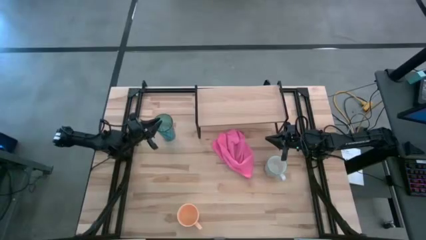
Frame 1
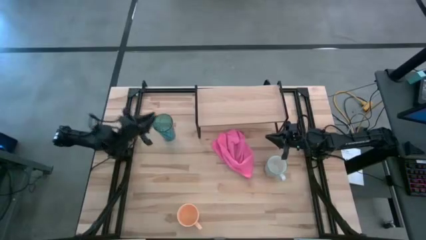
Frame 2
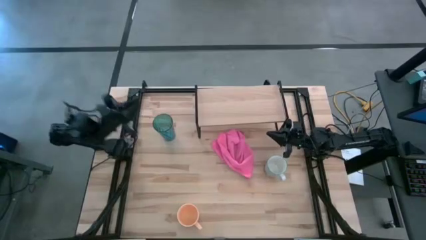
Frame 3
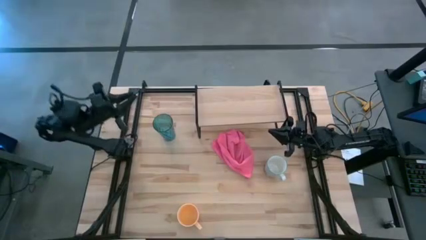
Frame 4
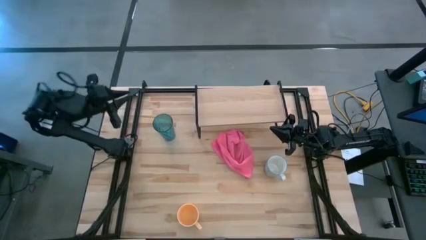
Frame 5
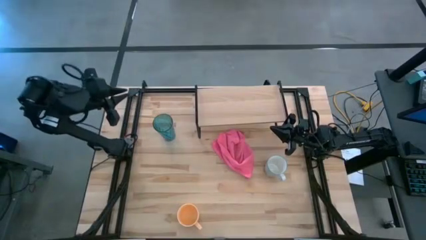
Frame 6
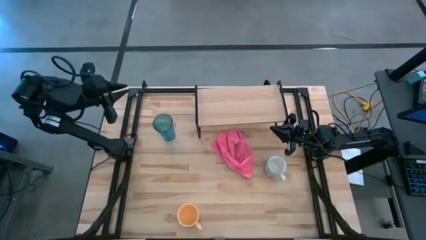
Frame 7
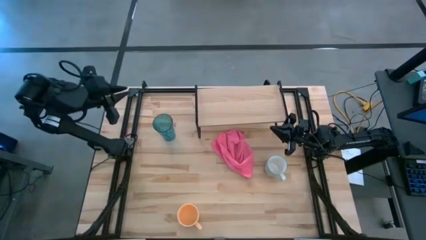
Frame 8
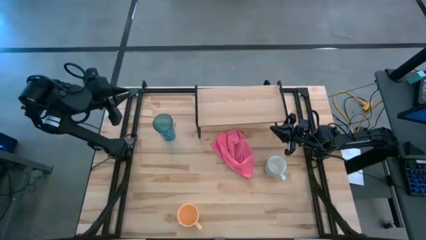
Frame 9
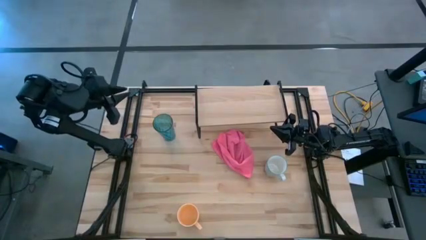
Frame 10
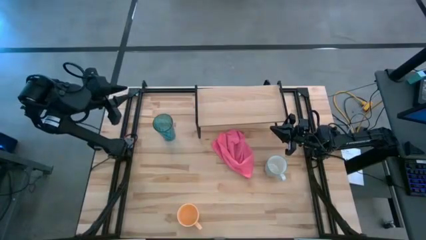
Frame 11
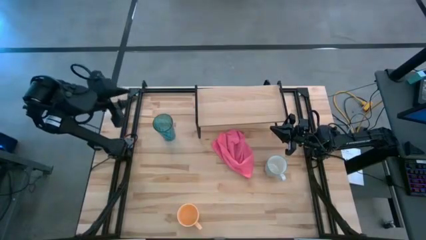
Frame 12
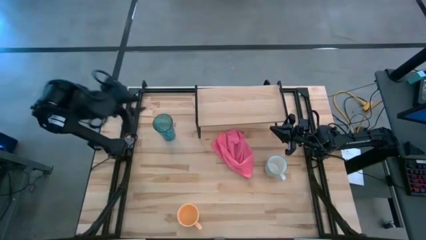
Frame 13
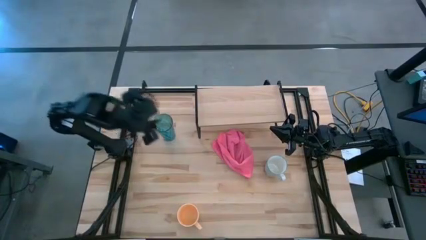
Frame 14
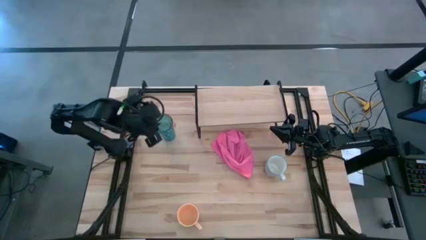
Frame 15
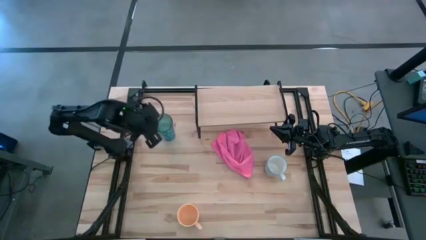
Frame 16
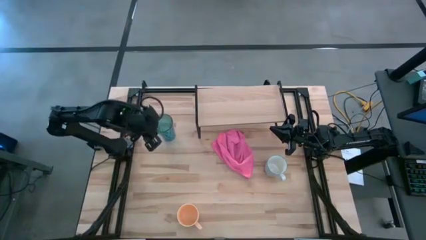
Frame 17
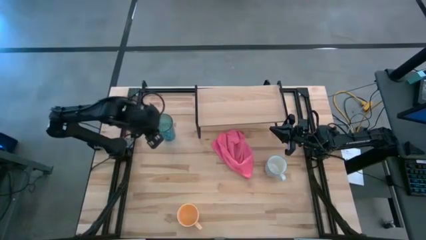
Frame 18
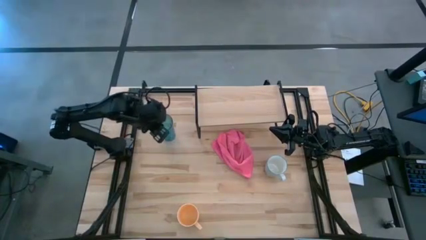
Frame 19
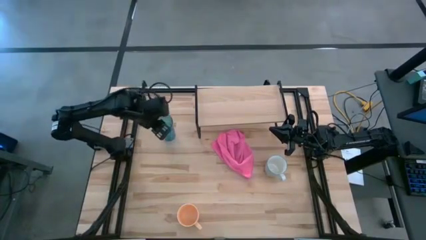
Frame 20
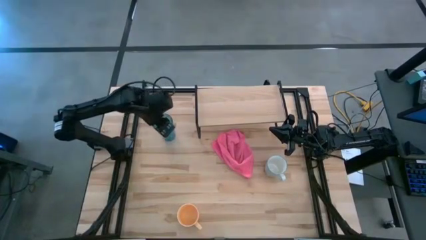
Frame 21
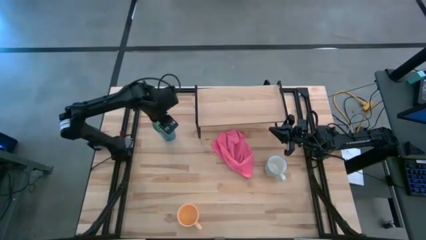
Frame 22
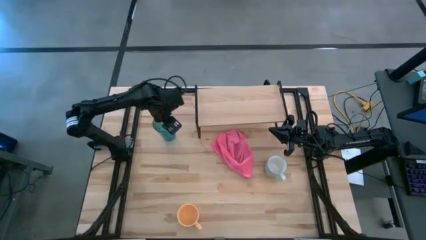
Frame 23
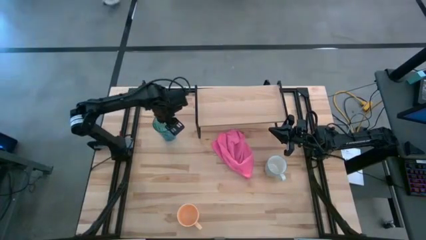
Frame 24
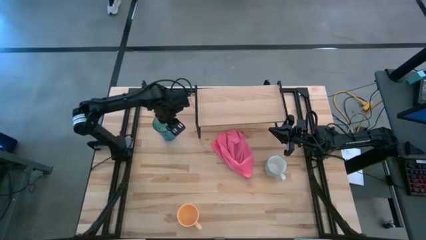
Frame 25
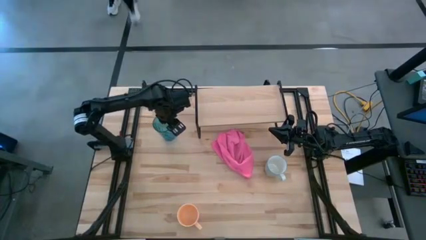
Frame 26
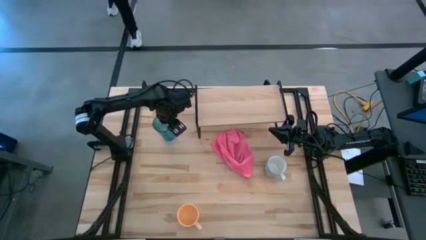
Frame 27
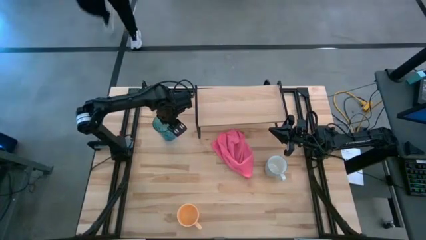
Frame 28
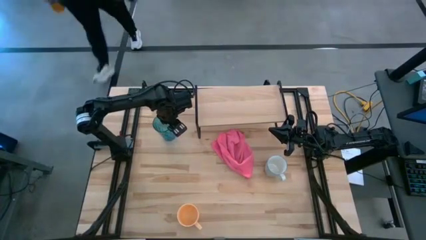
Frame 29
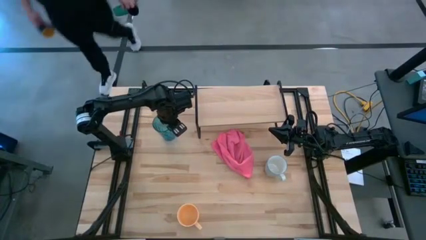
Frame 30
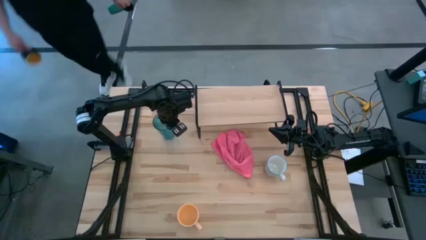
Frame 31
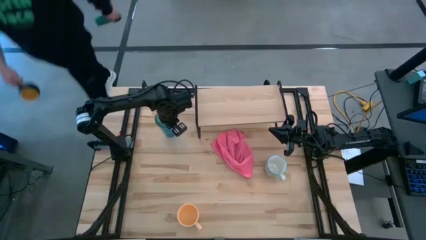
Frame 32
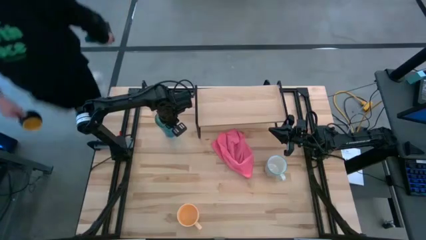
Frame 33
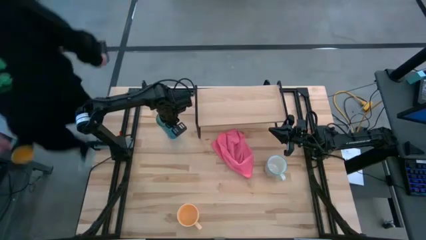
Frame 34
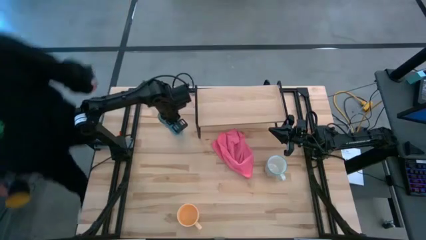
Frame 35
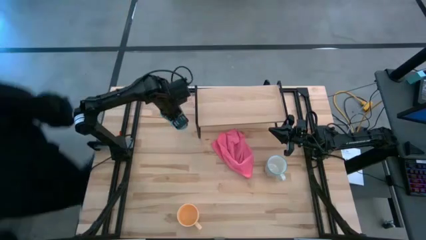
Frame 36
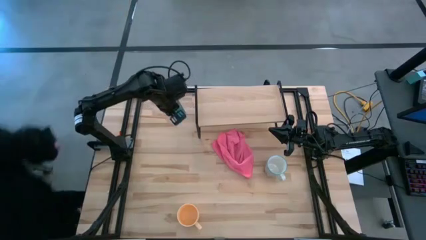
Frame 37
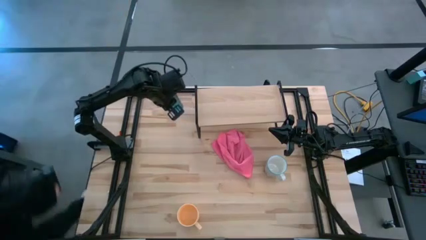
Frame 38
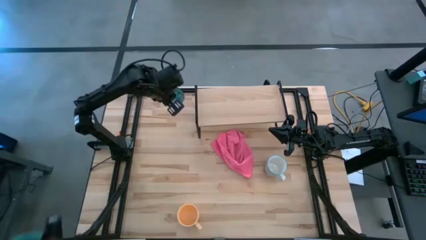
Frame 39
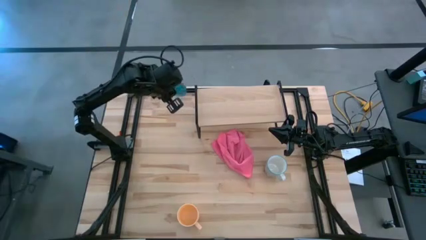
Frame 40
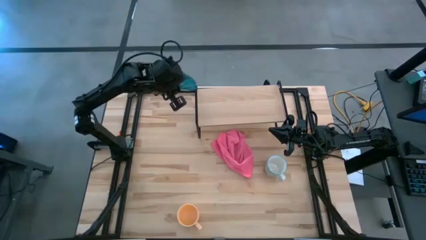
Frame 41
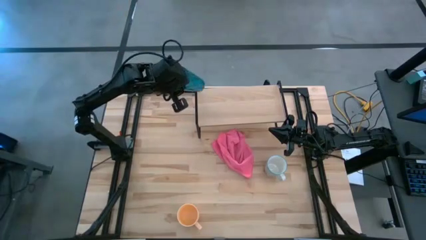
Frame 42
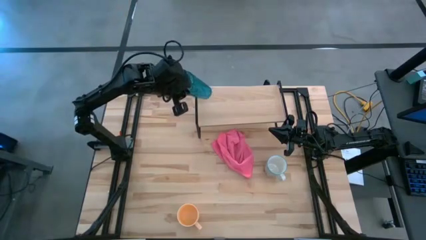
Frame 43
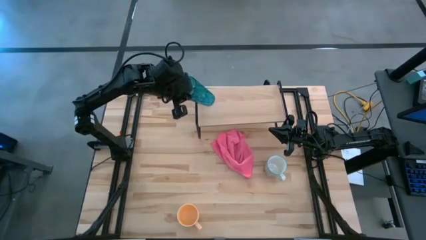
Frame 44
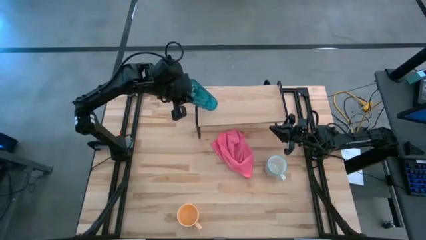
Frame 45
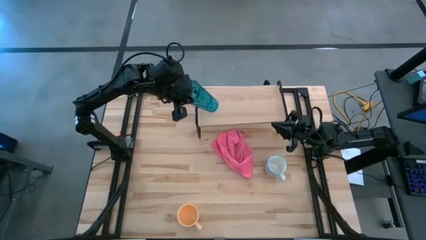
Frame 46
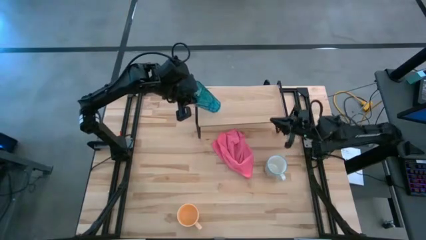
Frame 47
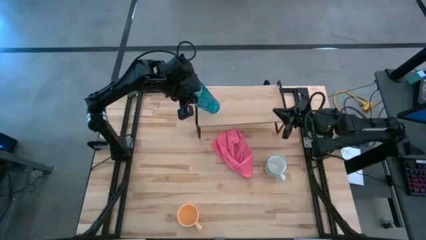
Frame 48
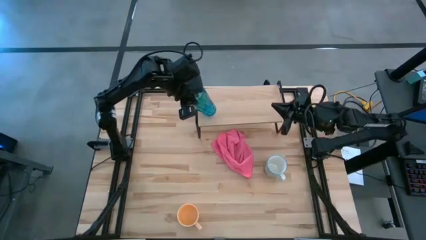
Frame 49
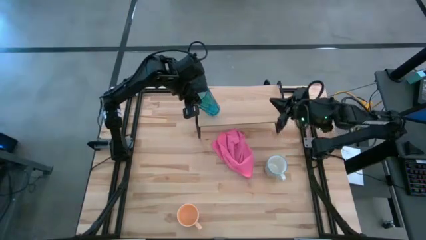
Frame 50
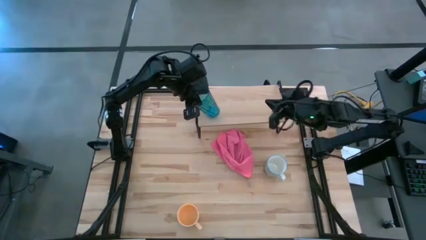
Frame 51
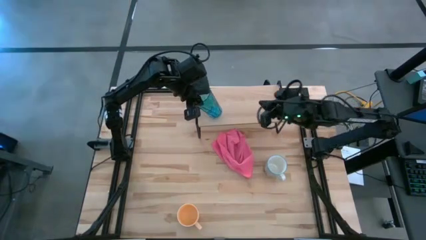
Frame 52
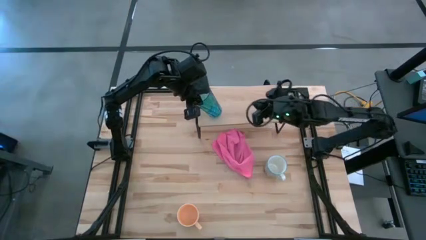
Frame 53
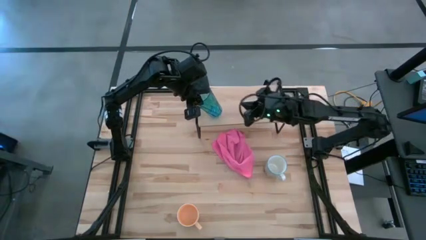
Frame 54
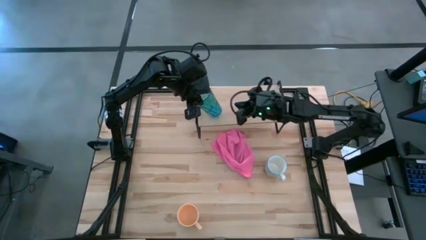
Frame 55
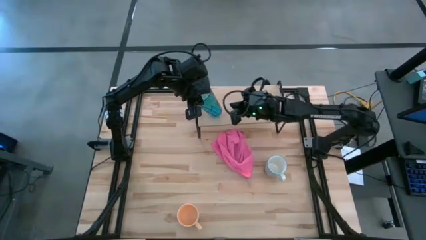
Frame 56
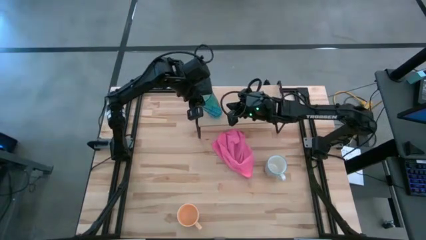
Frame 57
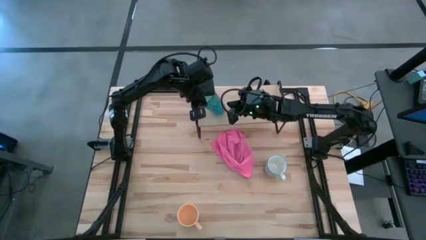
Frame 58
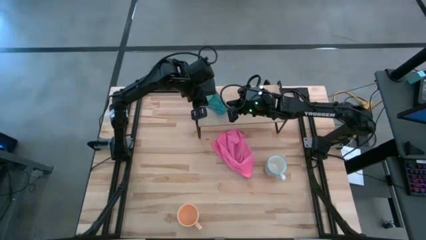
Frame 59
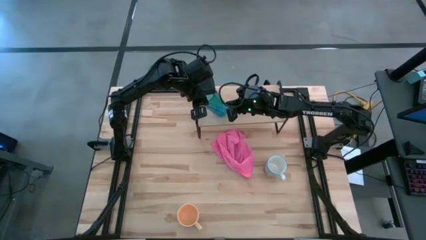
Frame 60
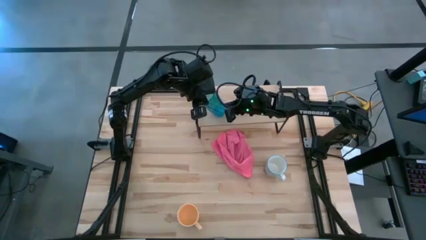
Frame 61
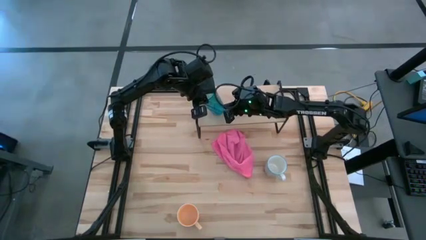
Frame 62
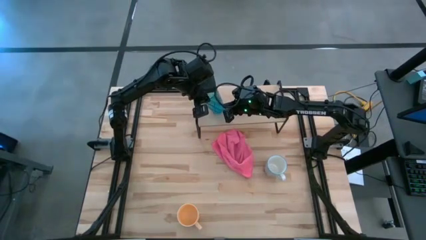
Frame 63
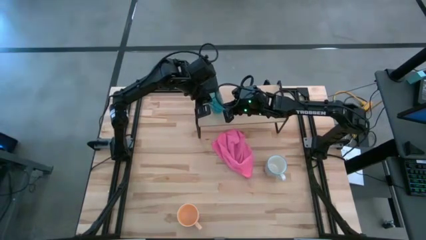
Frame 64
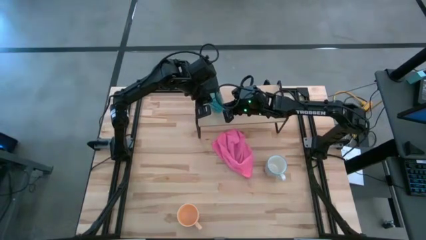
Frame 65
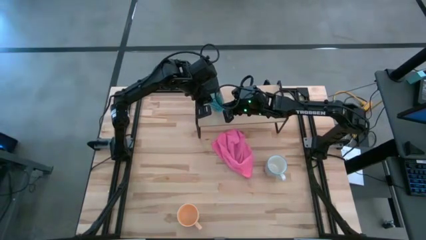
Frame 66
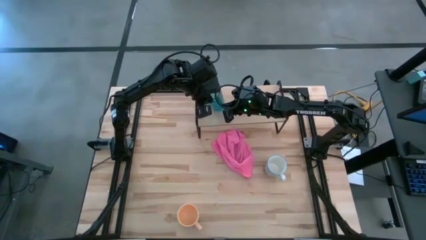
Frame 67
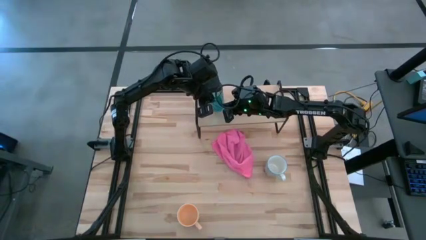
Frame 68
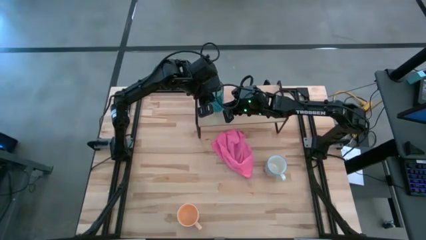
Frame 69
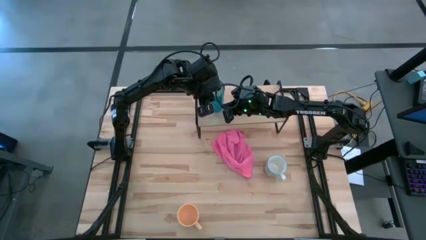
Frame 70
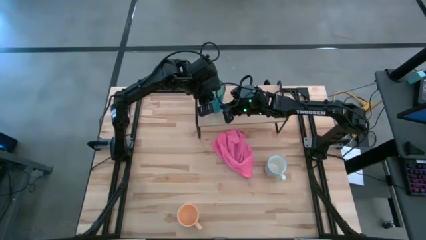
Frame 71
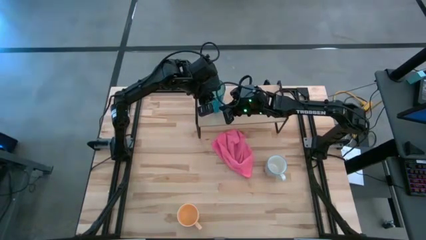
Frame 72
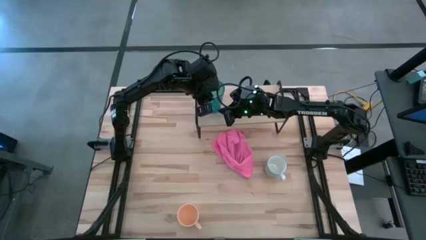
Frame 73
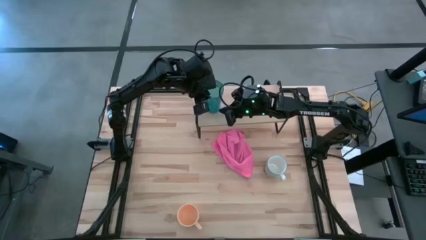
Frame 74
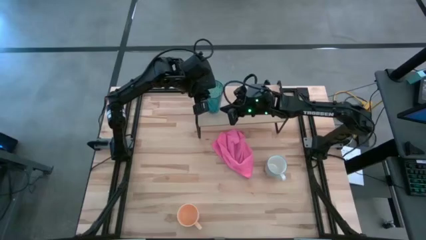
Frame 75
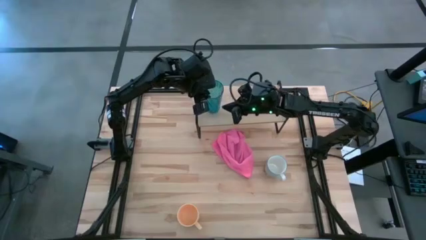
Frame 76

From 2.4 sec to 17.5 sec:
Task: Stack small to large cups/mugs on shelf
Put the blue cup on the shelf
